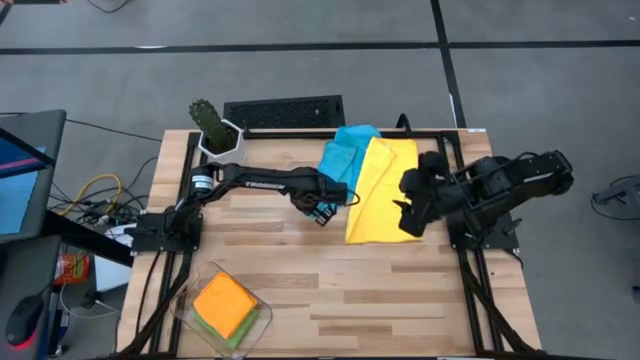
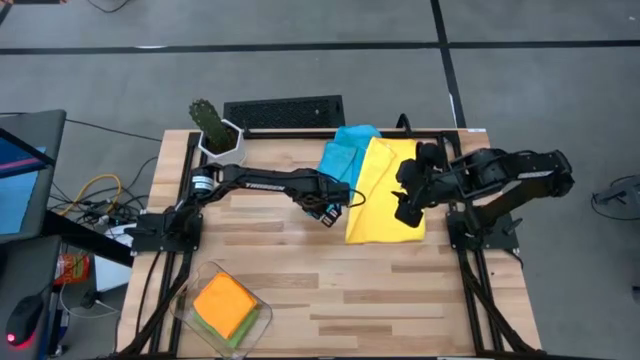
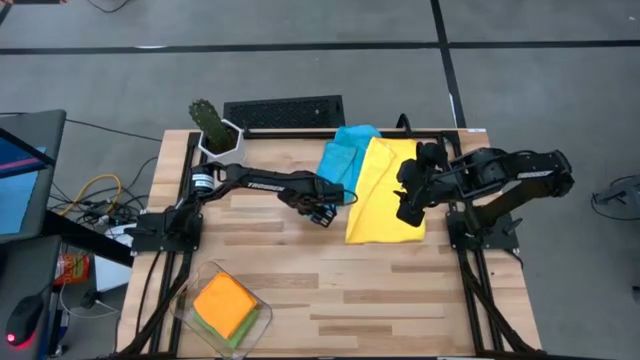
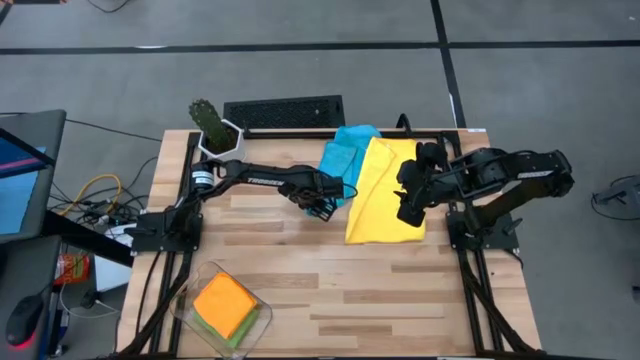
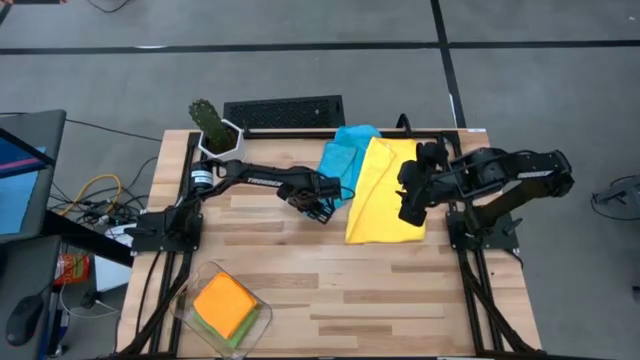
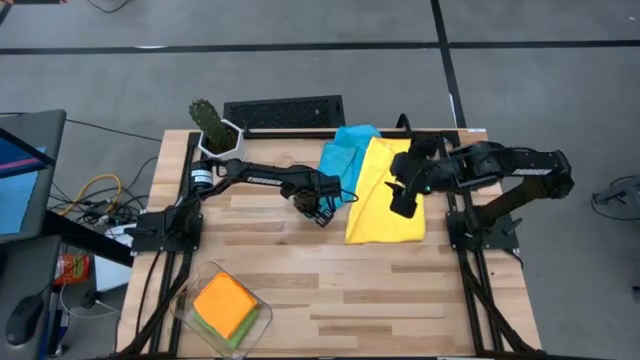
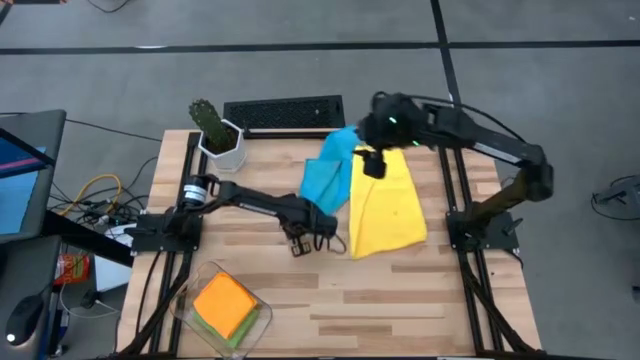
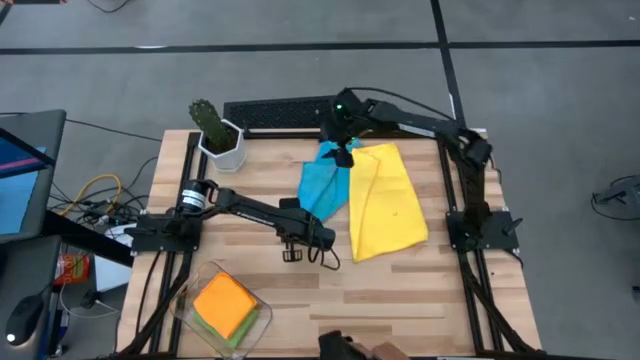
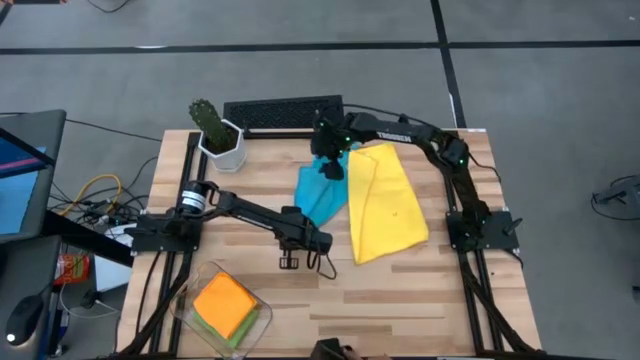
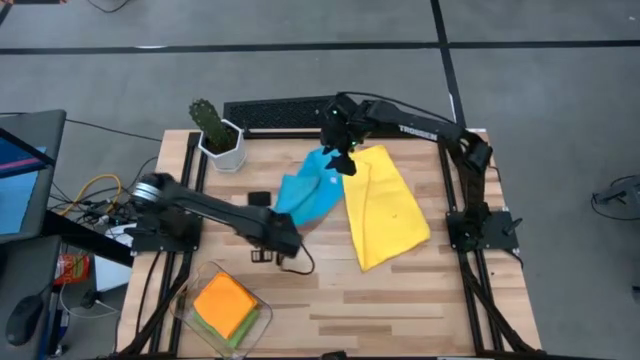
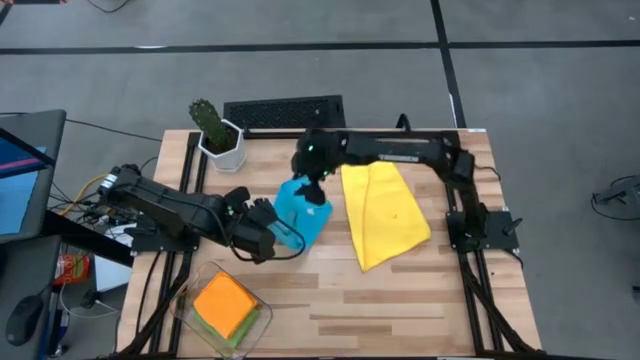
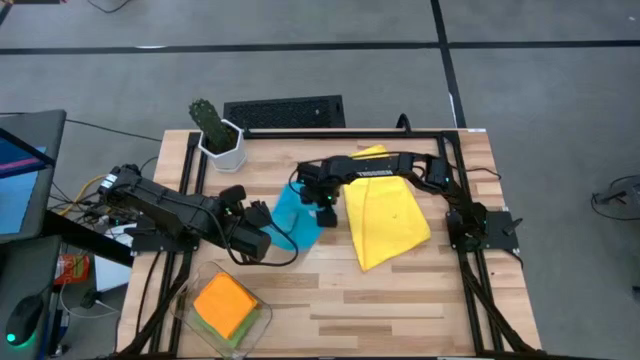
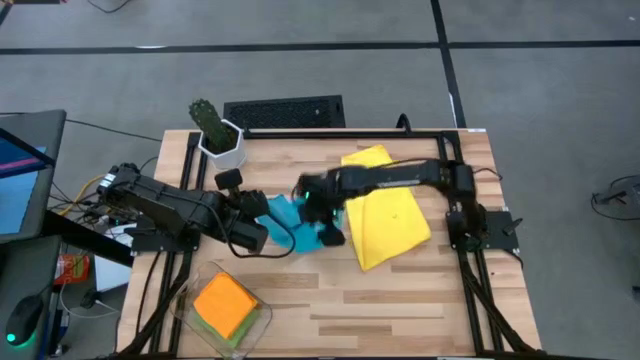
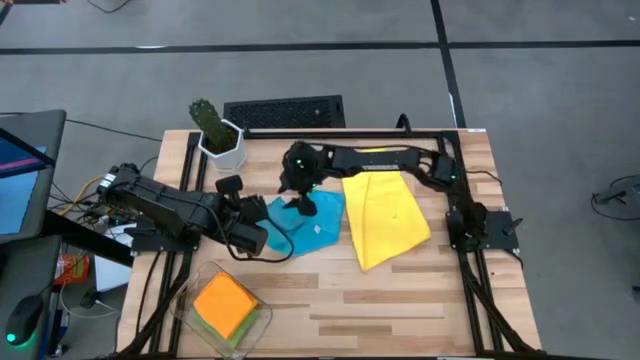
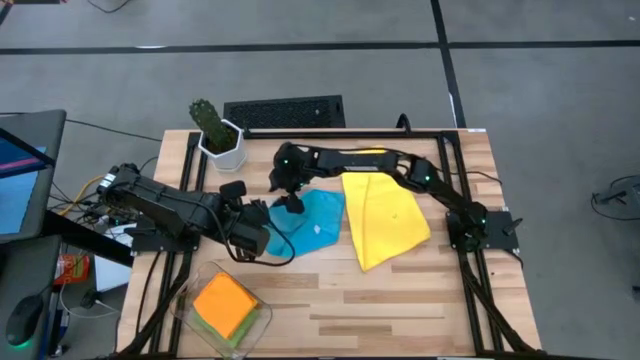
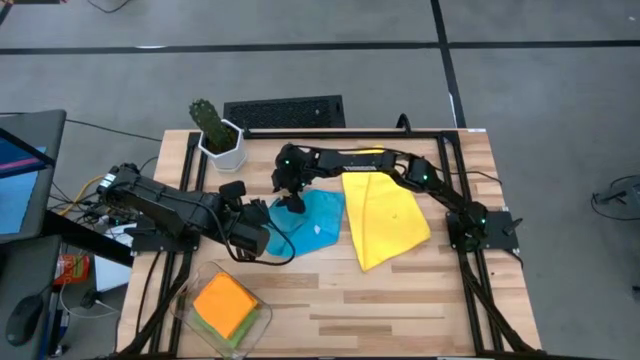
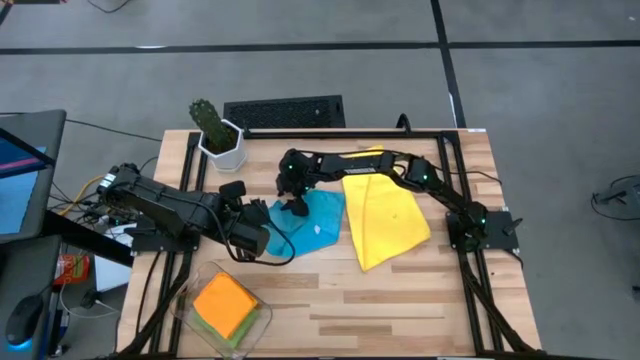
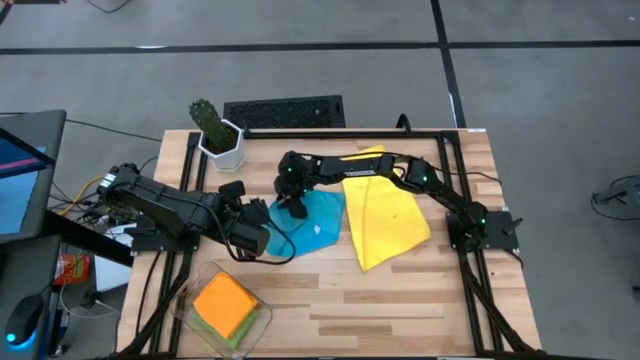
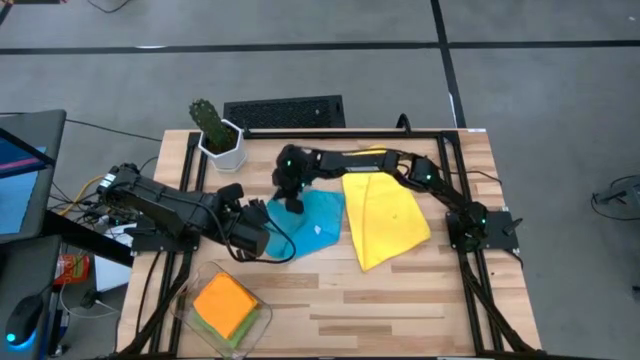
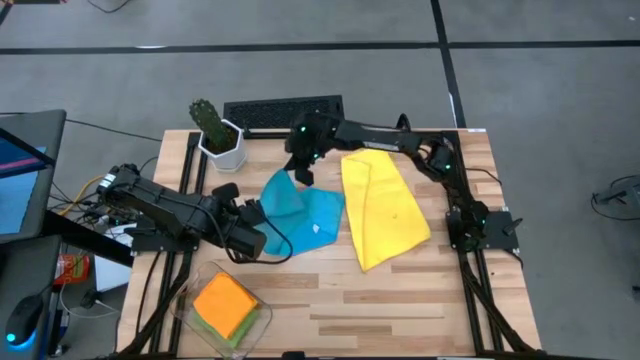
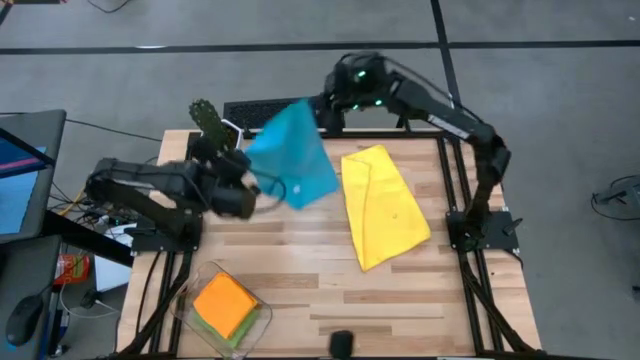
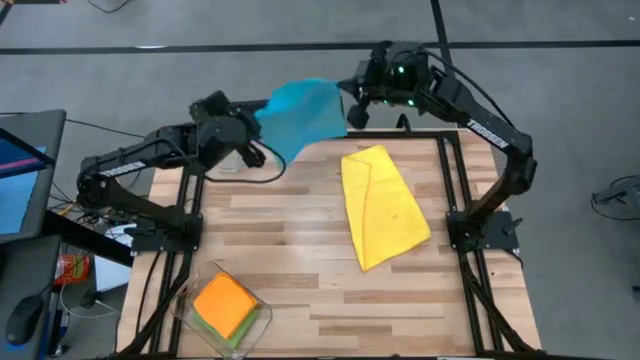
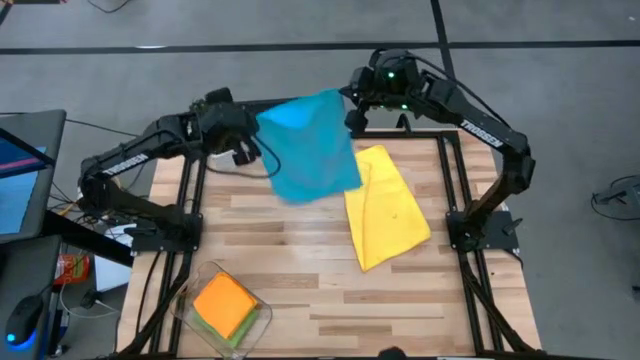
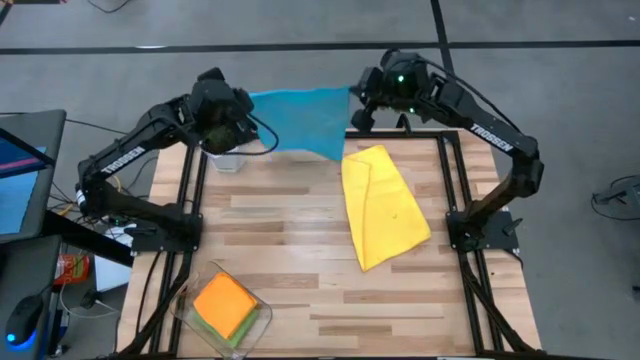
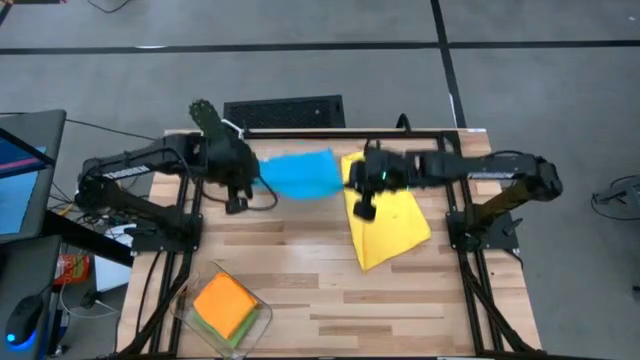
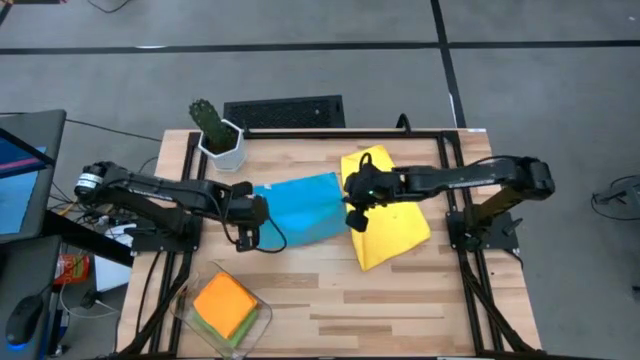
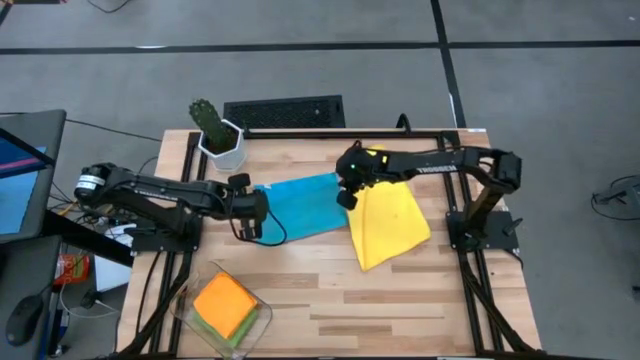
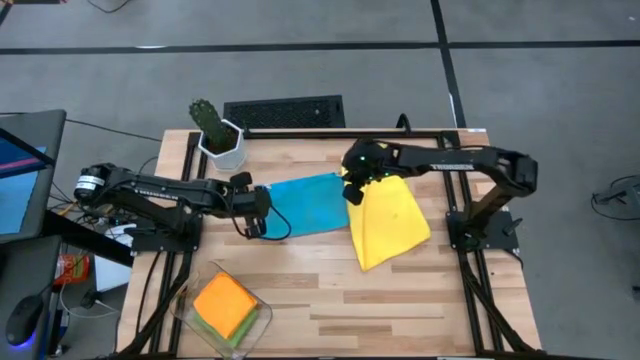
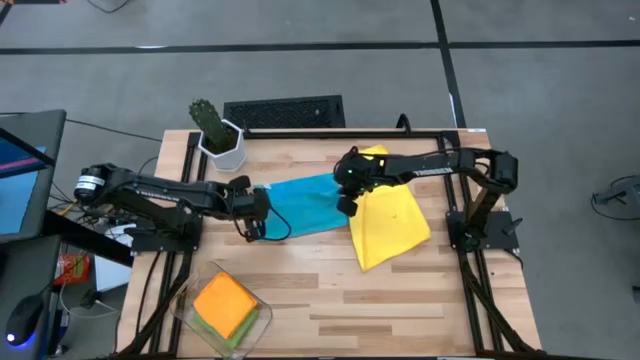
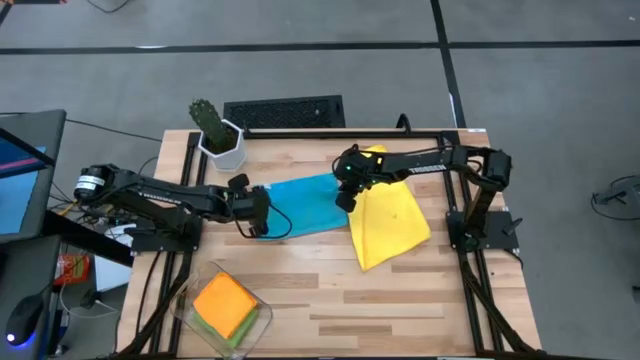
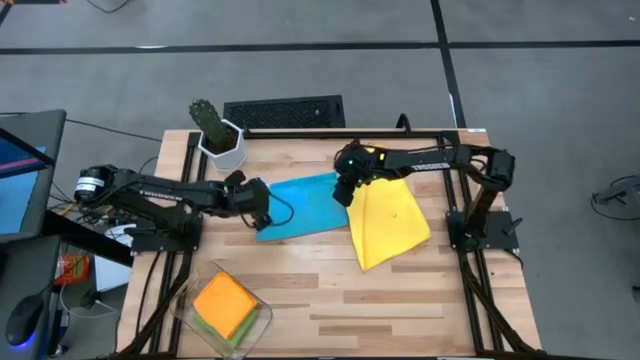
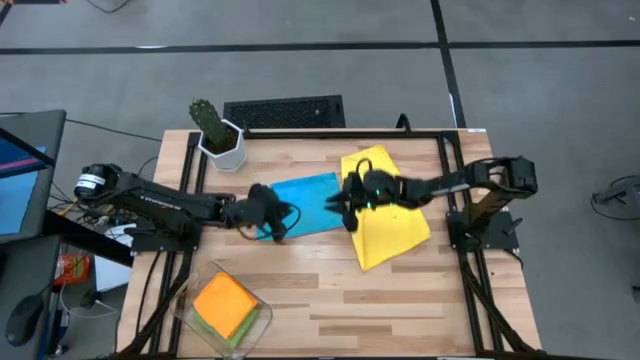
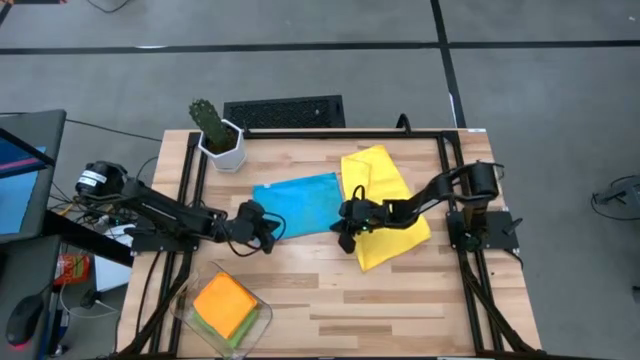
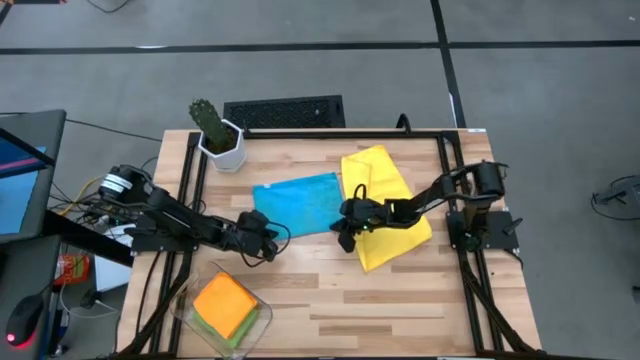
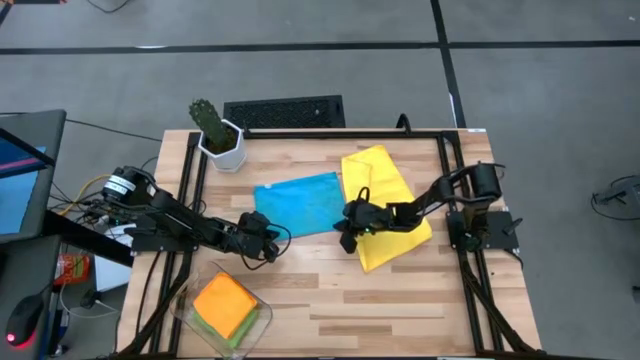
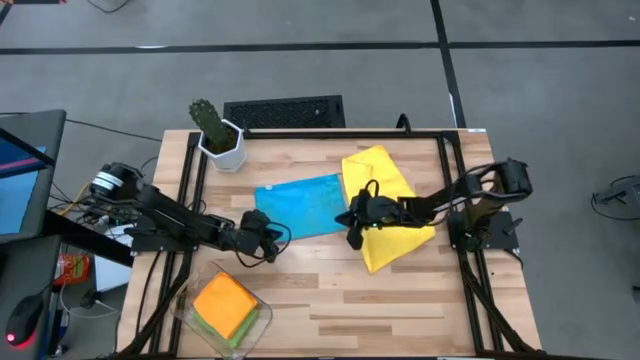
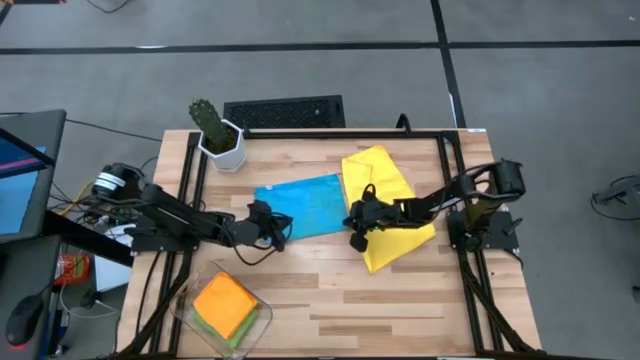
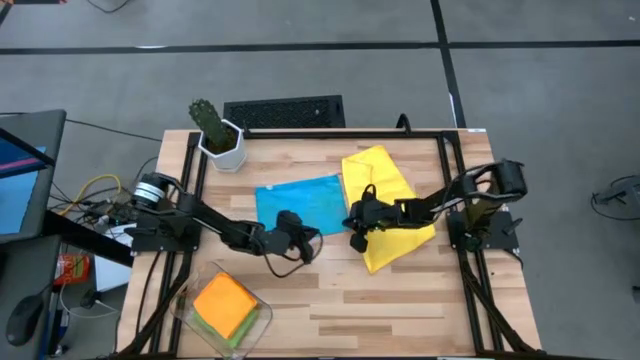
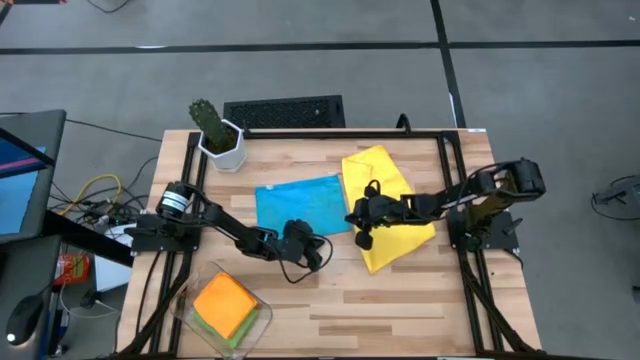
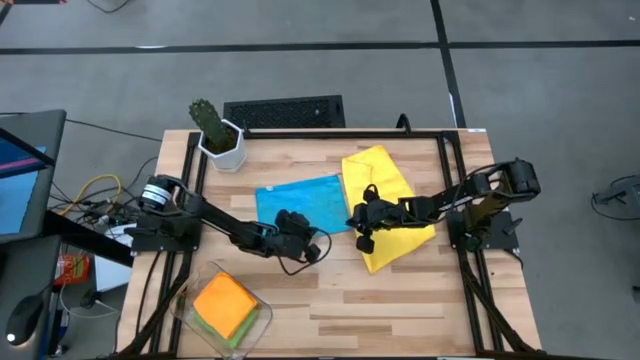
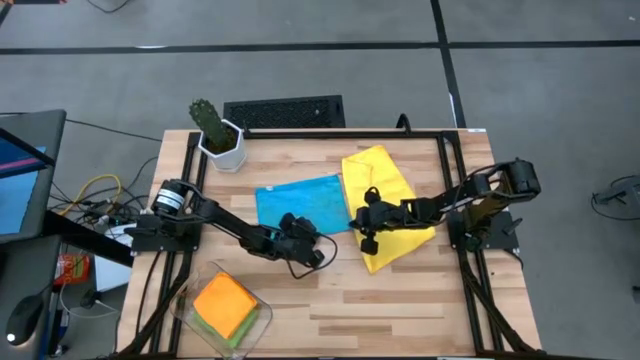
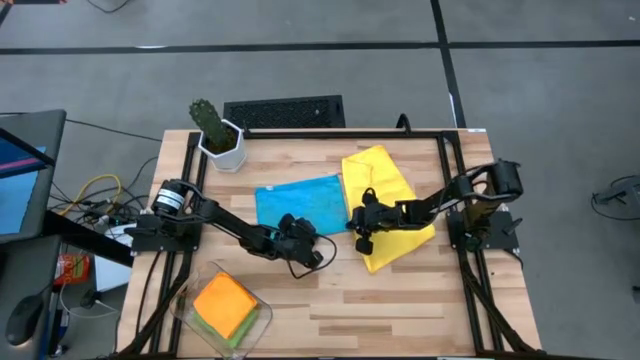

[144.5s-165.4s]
Task: Fold microfiber towels
Fold the blue microfiber towel

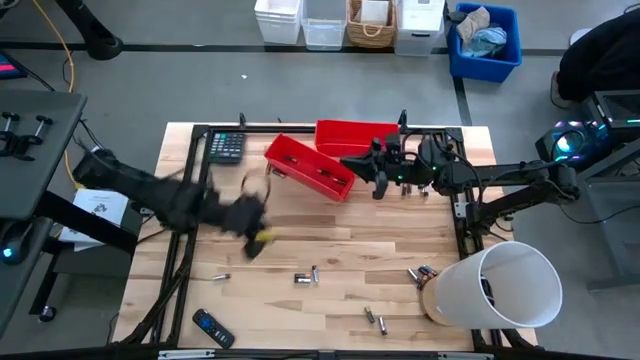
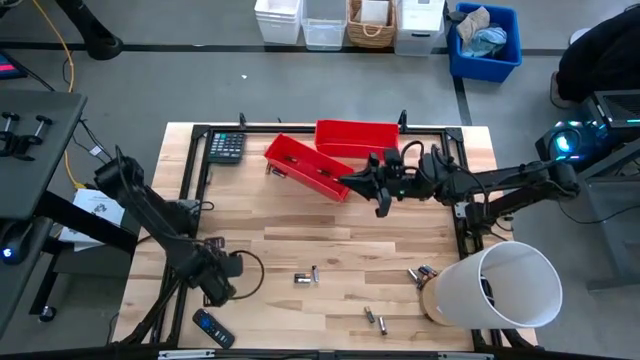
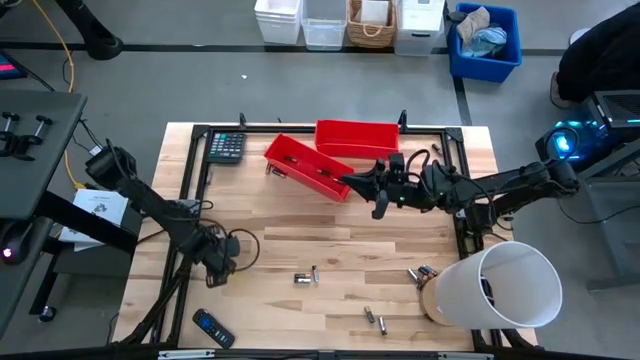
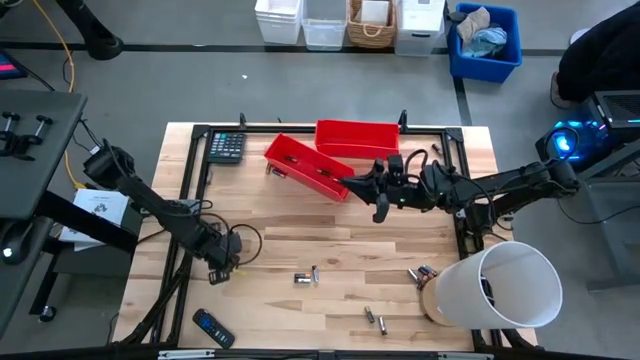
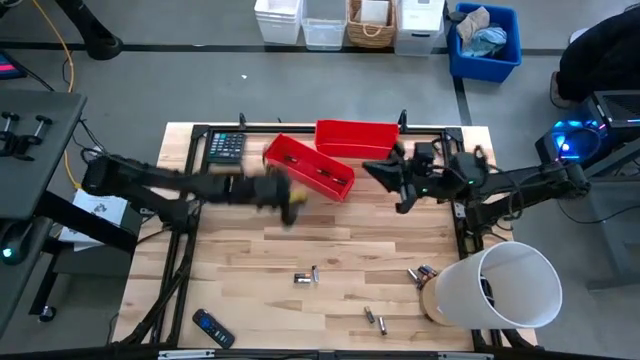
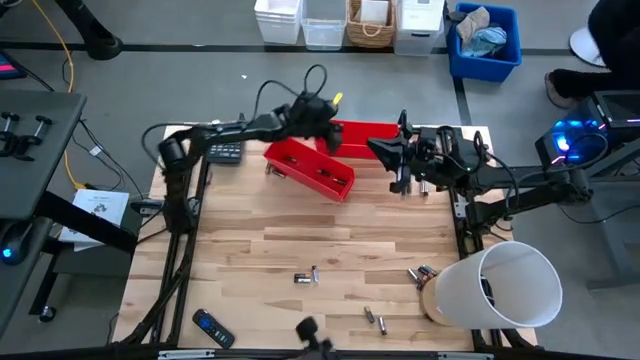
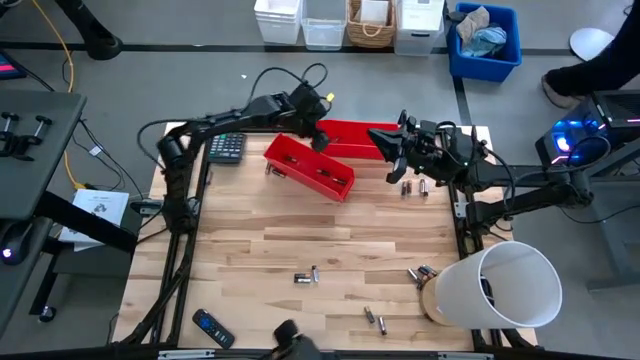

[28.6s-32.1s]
Task: Sort batteries
Put the silver battery into the top red bin
